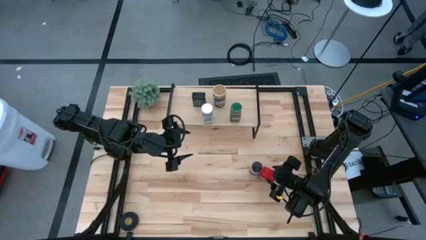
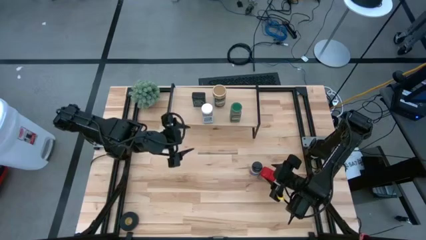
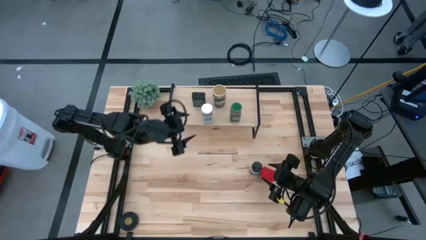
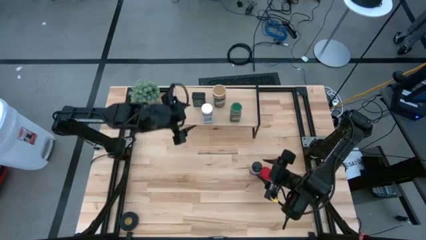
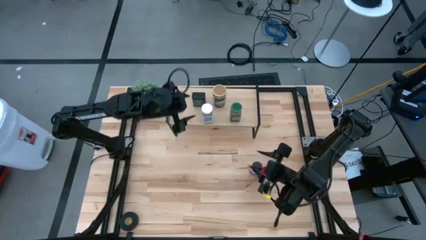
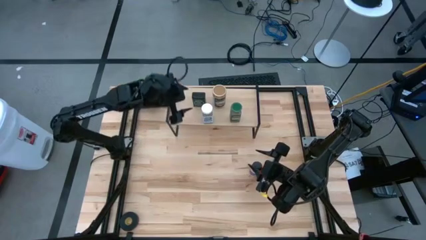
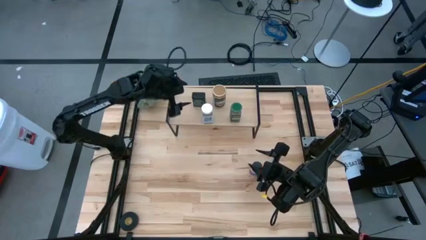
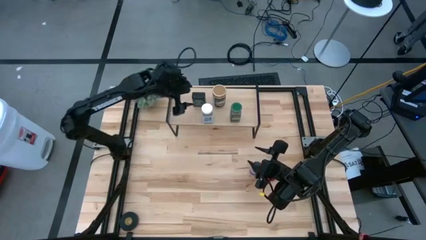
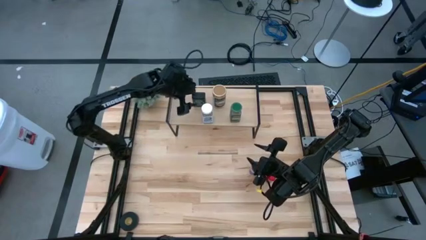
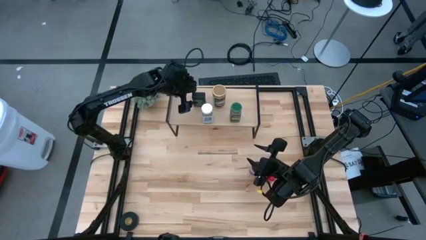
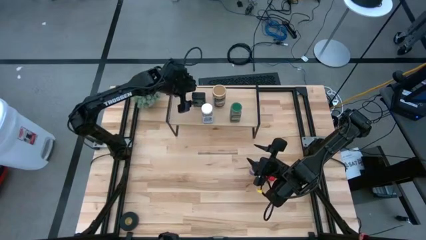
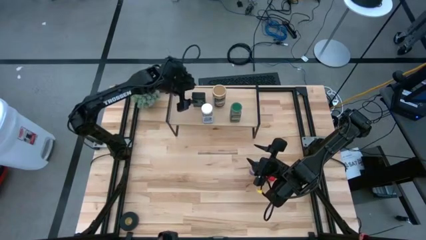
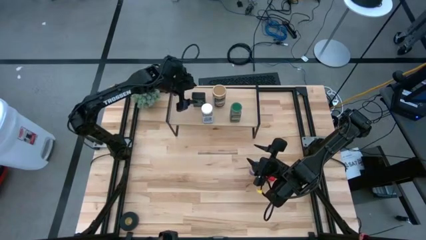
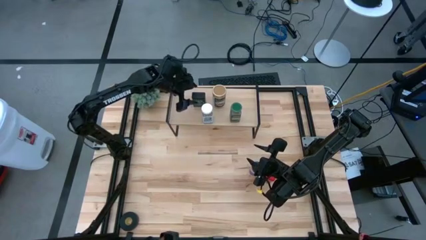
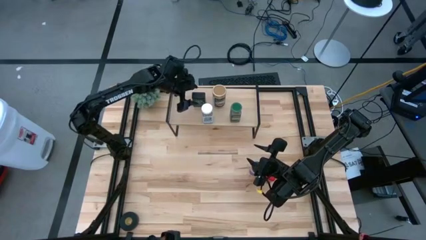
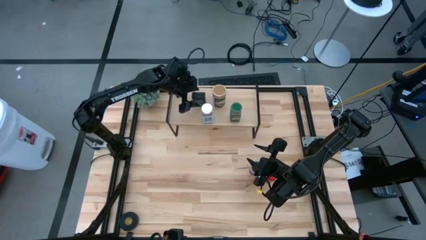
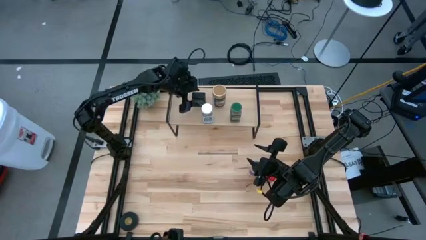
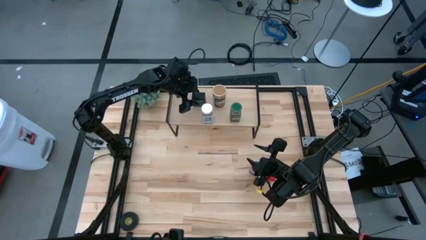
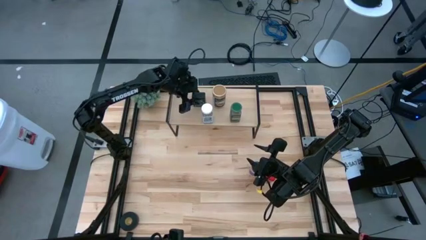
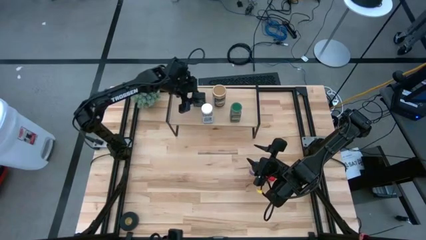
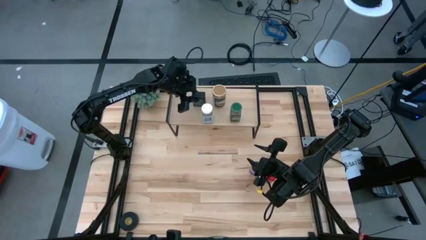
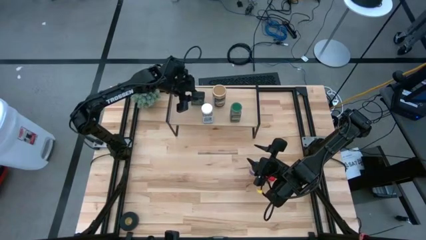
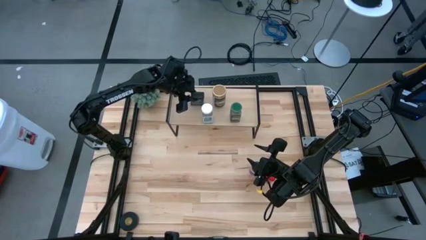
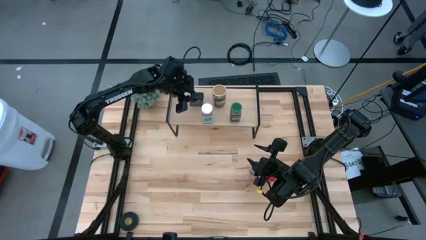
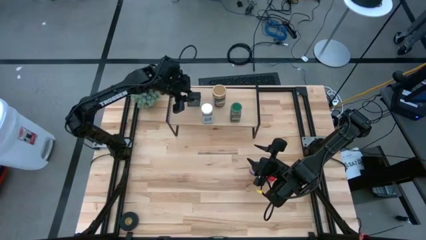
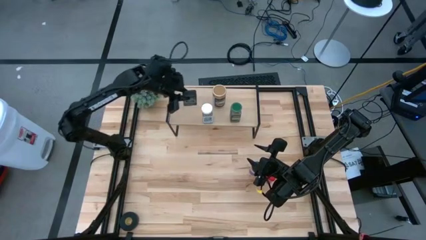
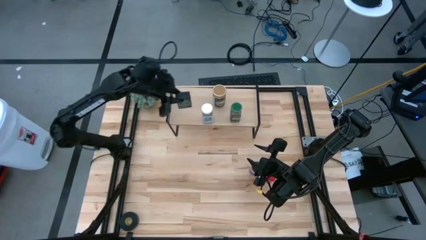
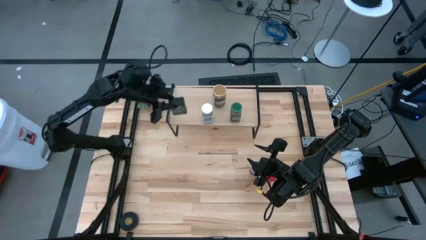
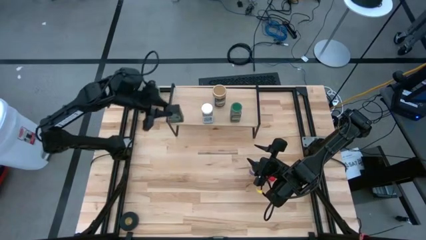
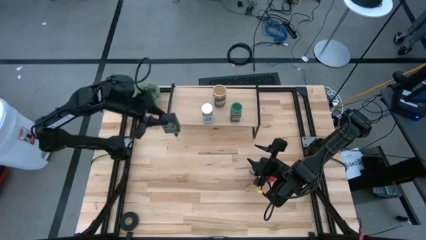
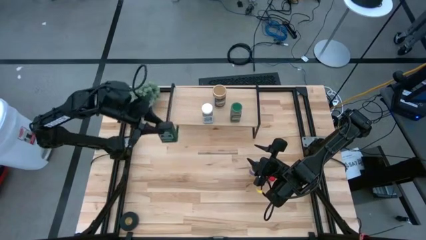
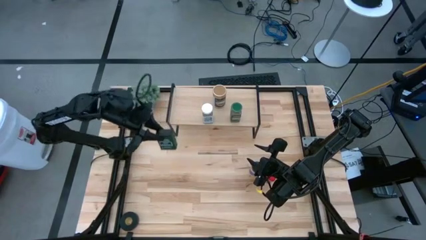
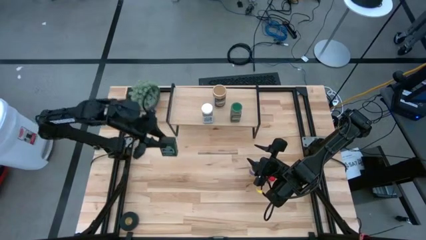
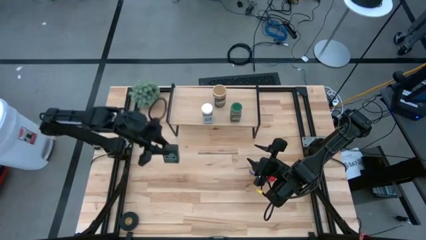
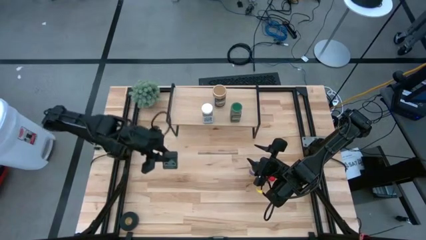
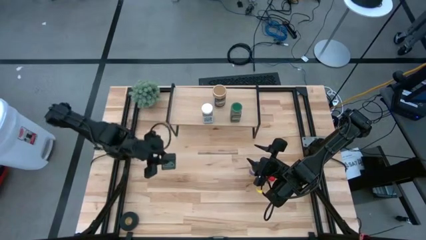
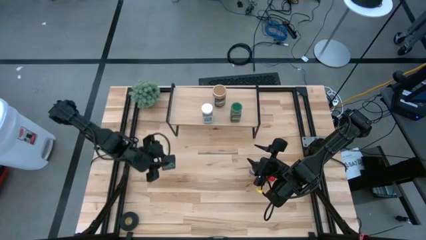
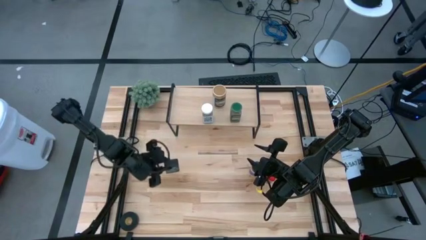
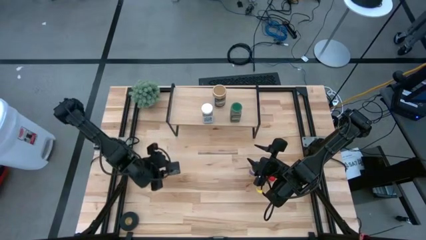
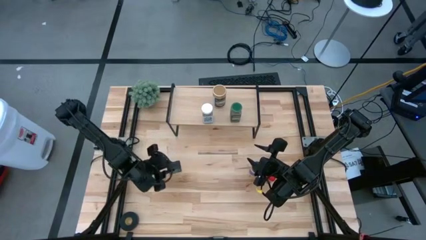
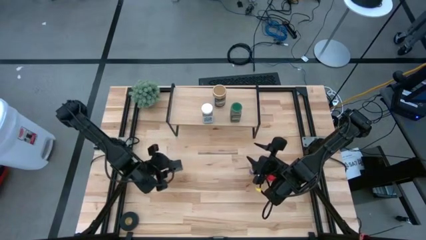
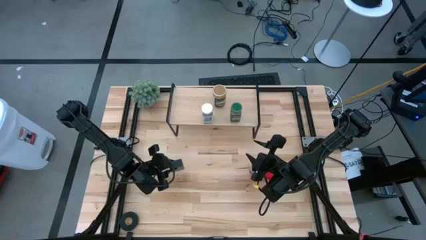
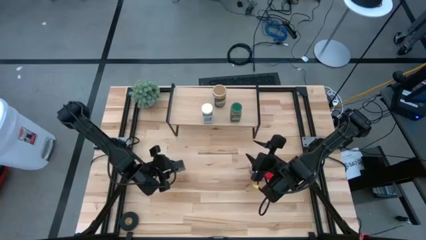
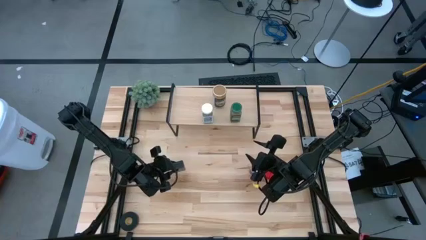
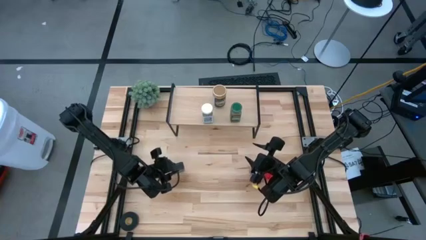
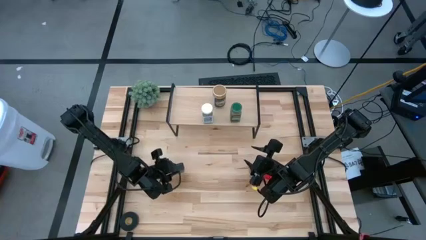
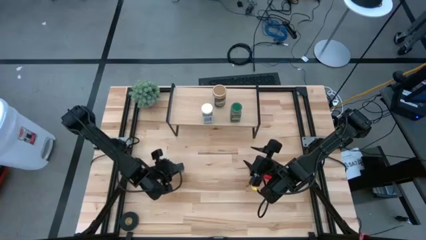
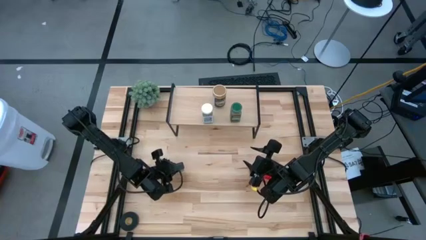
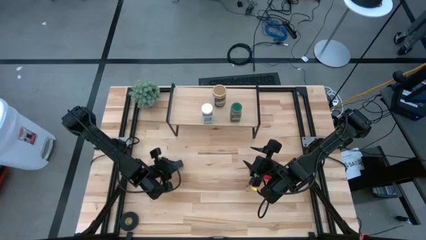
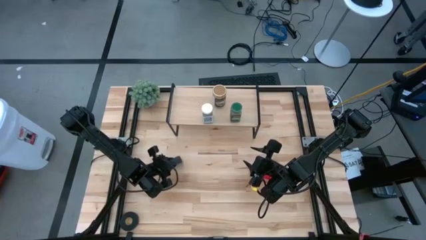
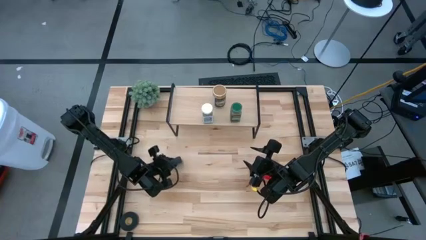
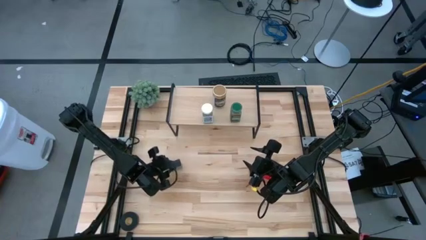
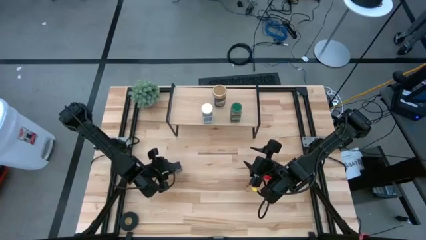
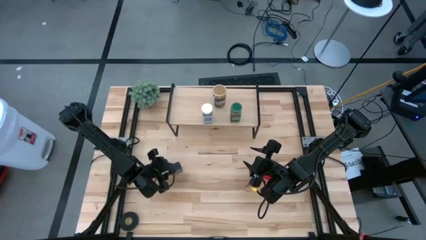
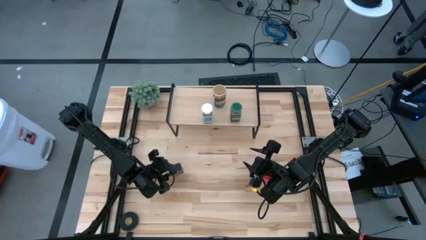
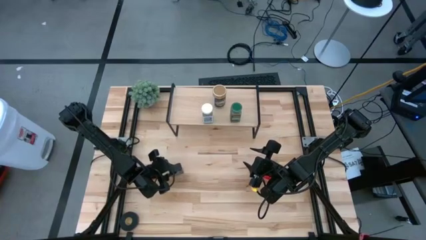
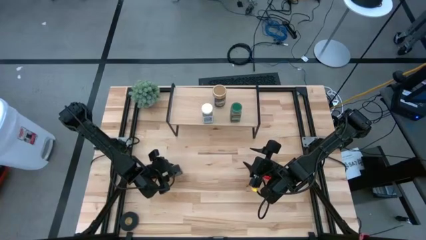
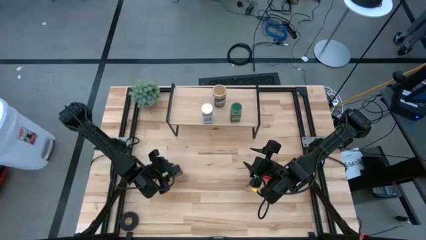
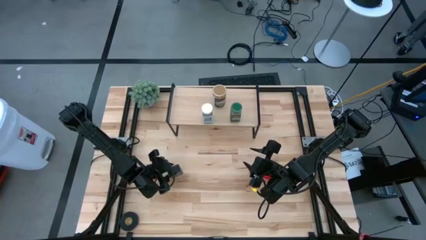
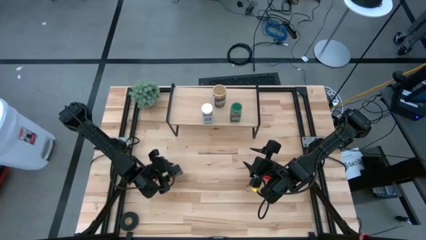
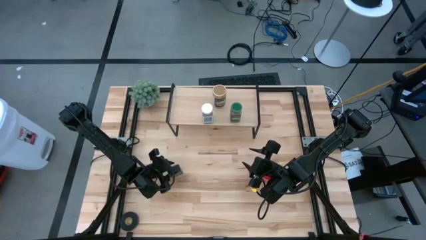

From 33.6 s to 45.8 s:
Task: Shelf spices
Remove the black seasoning can from the shelf

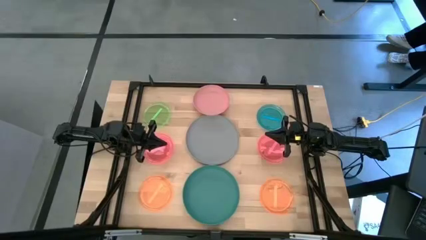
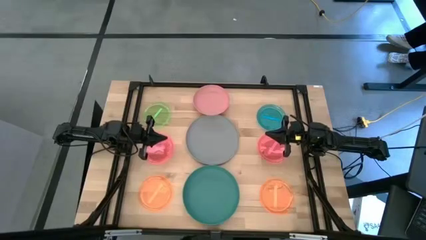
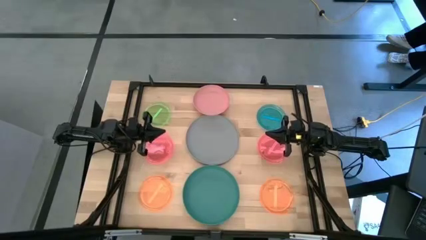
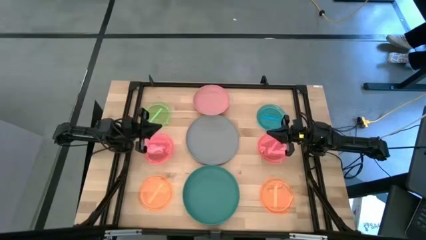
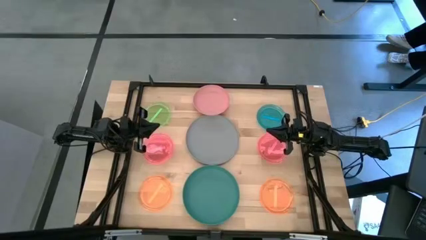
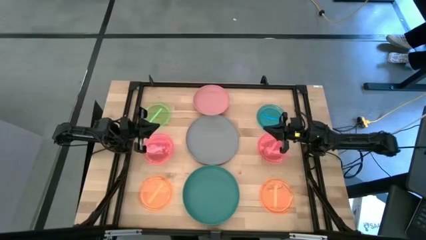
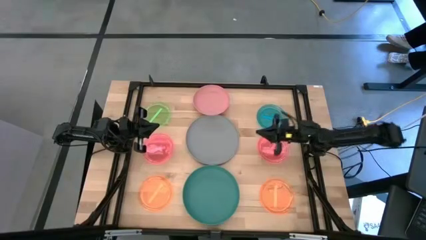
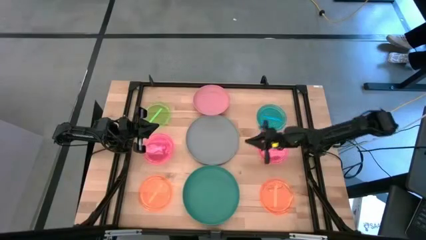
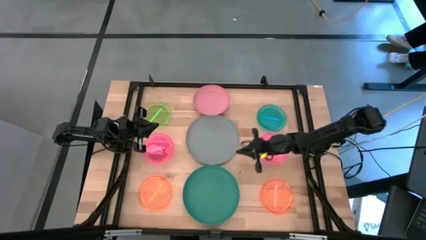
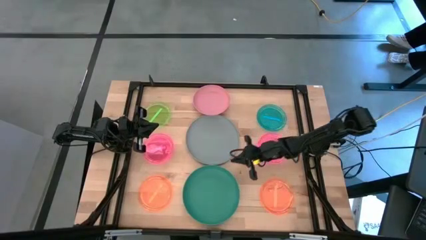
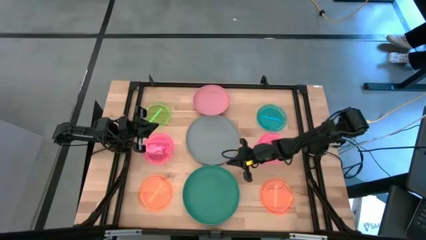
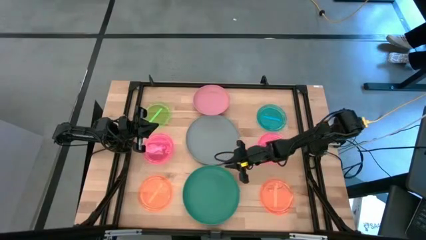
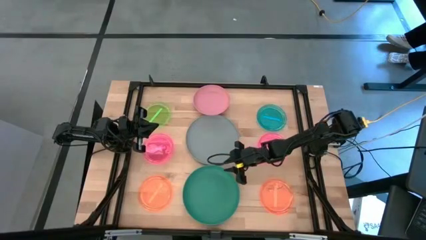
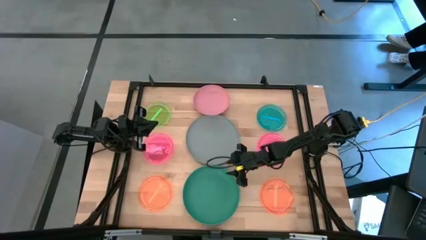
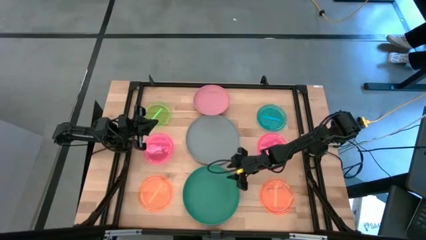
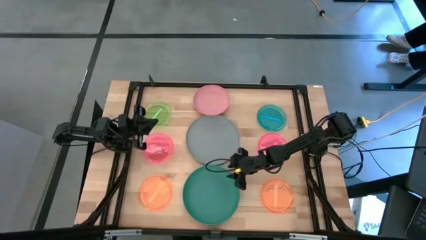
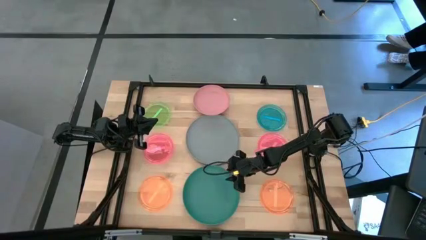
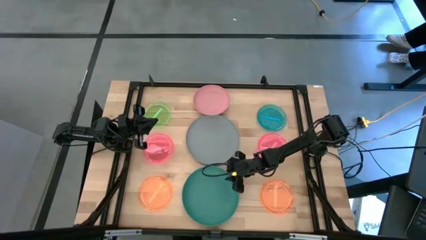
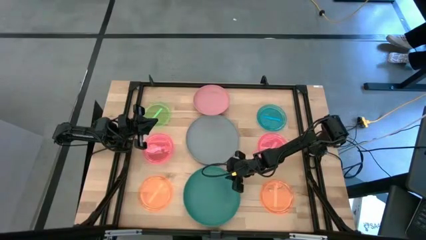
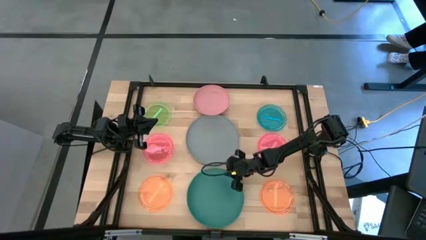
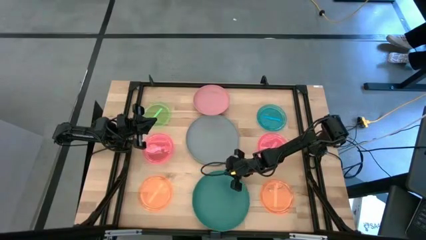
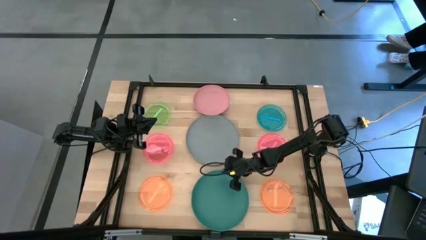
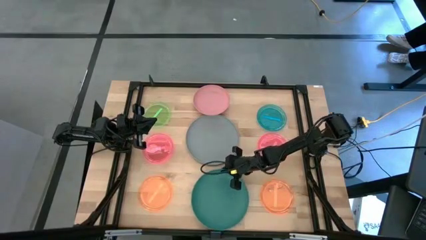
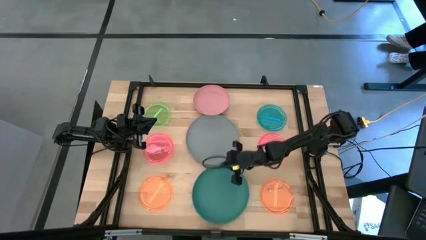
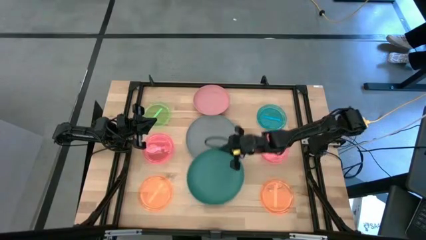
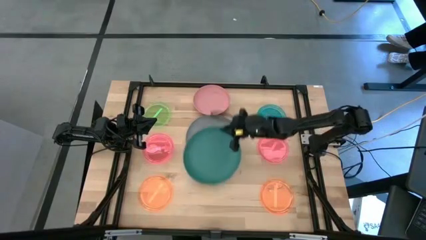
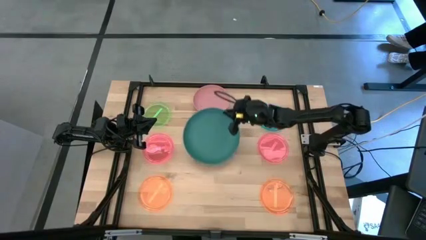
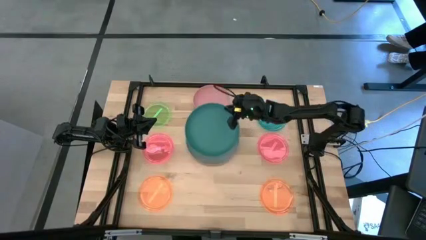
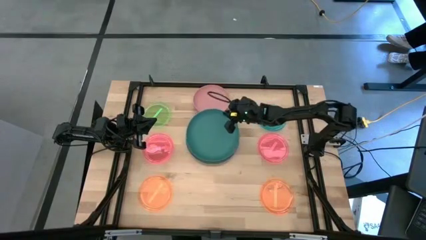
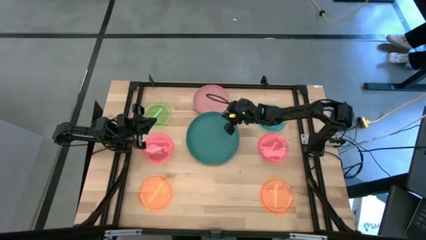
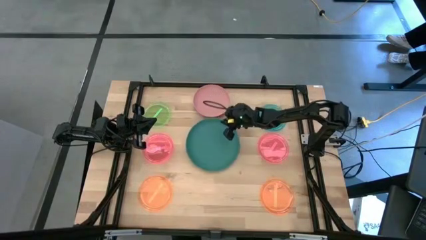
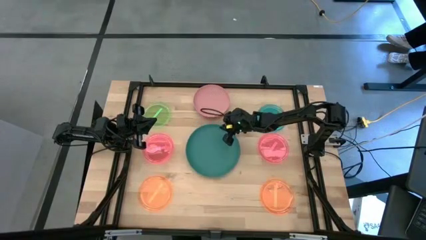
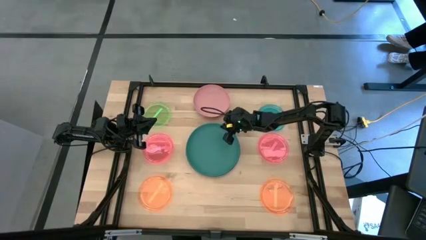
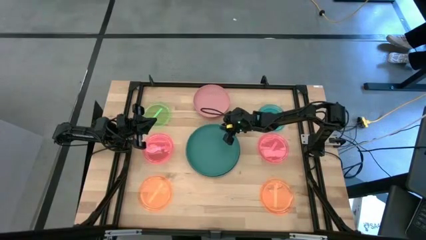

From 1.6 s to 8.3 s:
Task: Stack plastic plates
Stack the green plate on top of the gray plate
